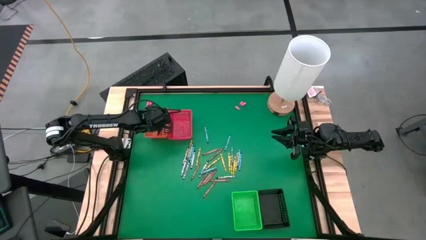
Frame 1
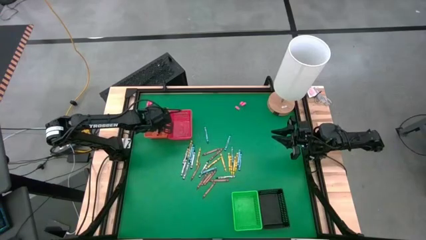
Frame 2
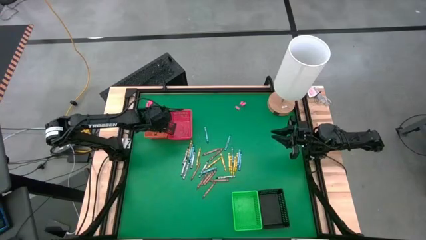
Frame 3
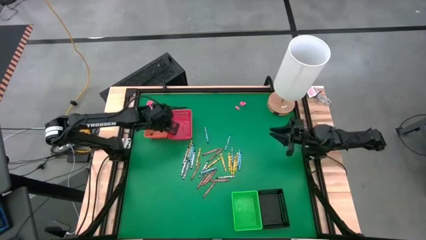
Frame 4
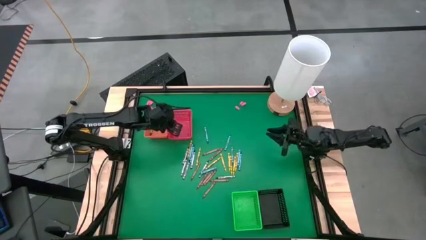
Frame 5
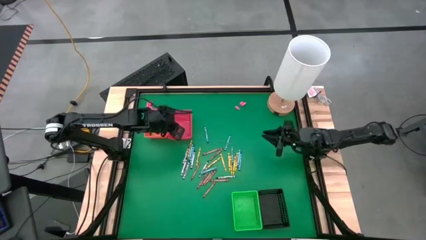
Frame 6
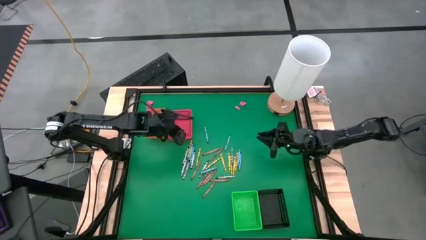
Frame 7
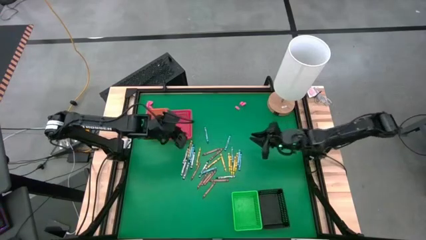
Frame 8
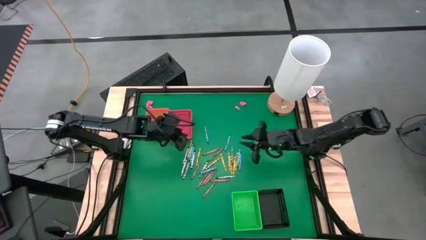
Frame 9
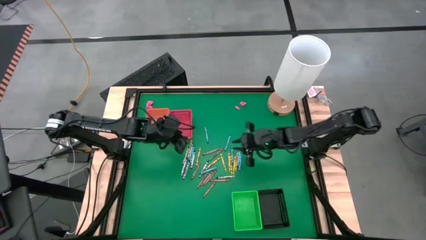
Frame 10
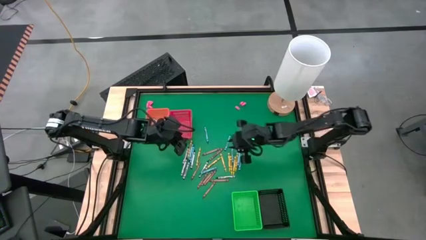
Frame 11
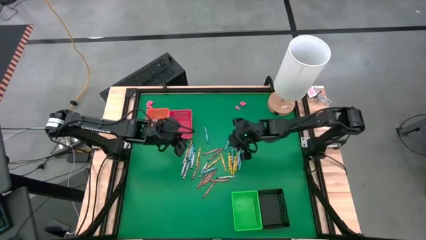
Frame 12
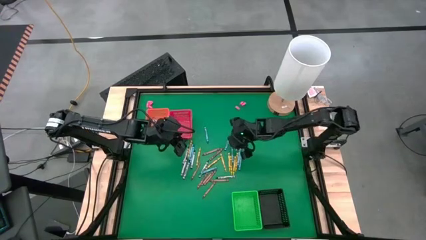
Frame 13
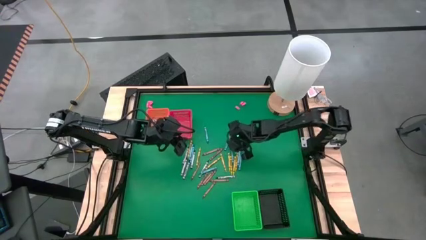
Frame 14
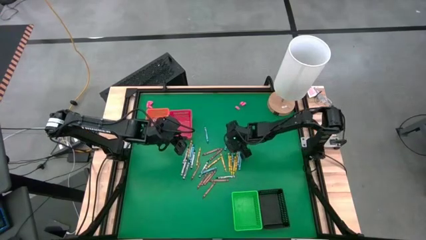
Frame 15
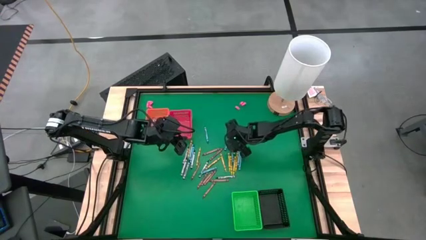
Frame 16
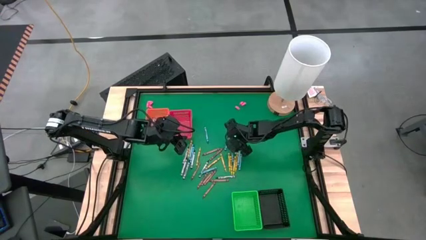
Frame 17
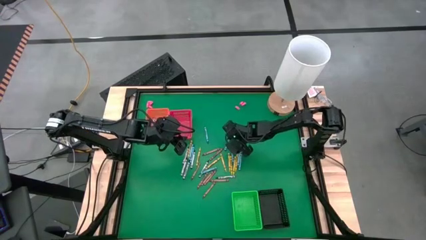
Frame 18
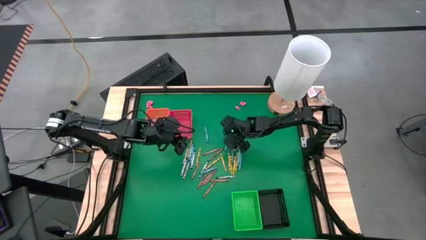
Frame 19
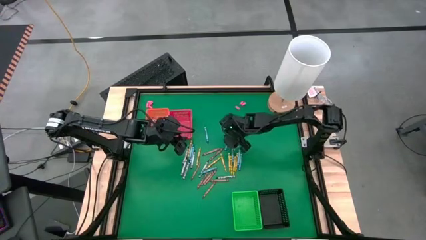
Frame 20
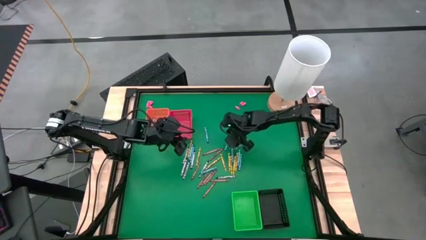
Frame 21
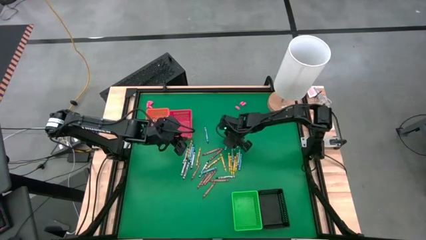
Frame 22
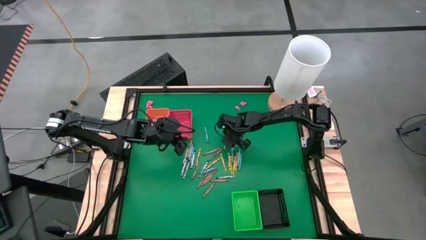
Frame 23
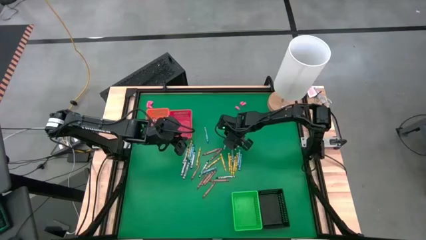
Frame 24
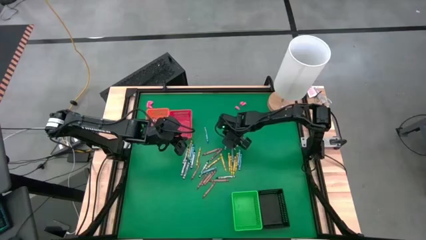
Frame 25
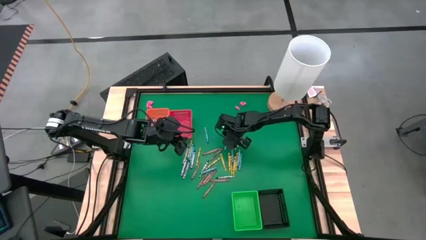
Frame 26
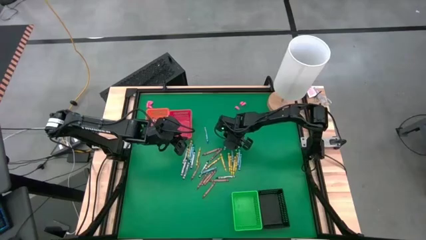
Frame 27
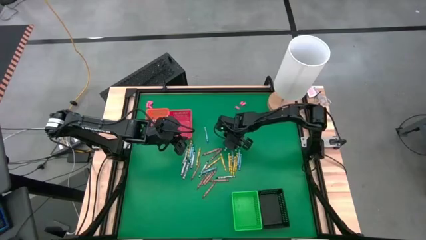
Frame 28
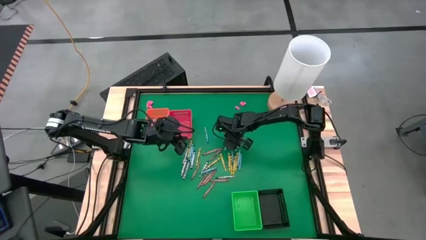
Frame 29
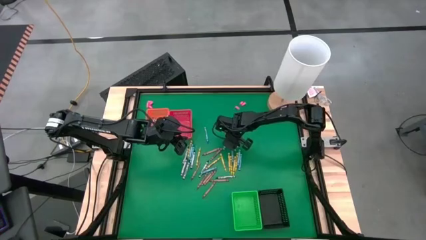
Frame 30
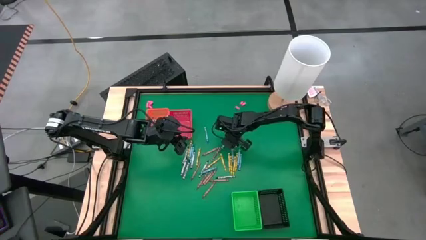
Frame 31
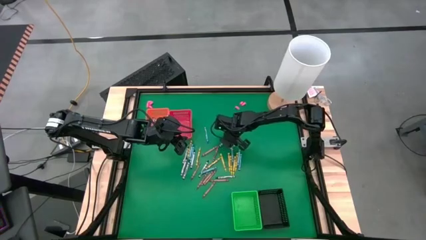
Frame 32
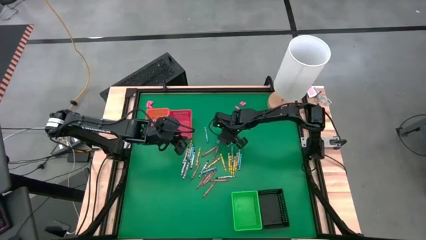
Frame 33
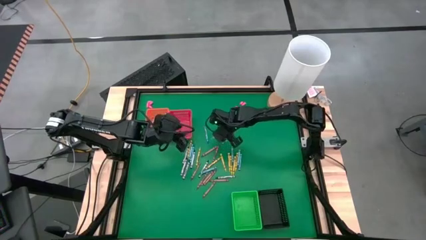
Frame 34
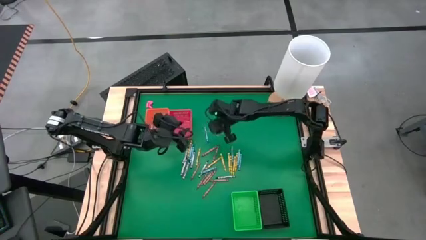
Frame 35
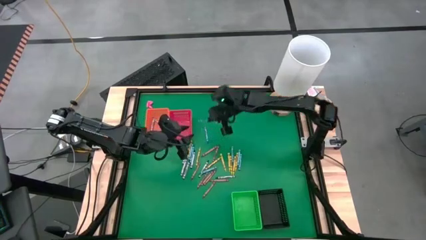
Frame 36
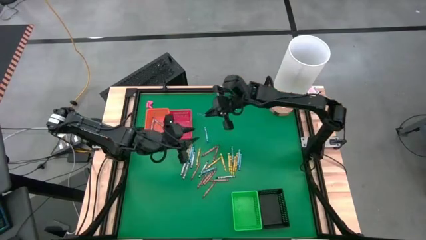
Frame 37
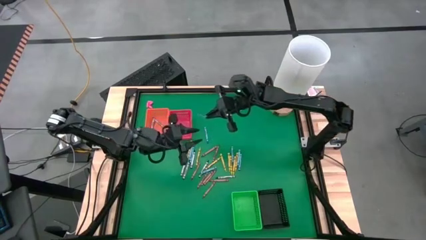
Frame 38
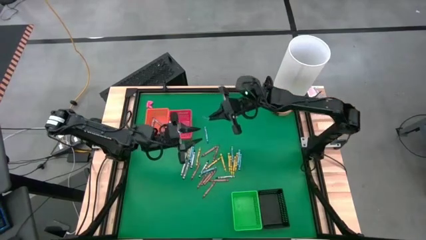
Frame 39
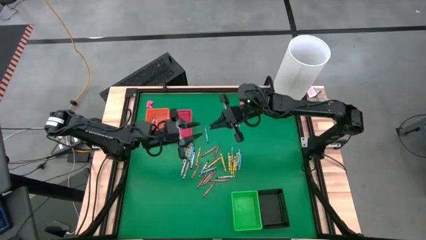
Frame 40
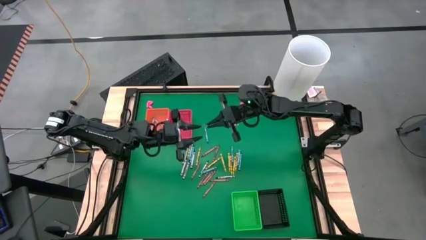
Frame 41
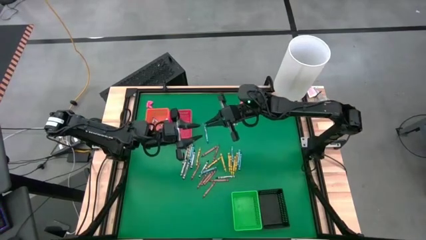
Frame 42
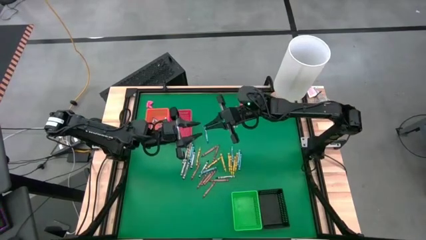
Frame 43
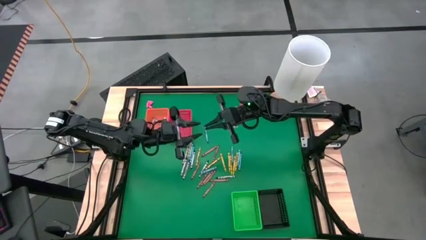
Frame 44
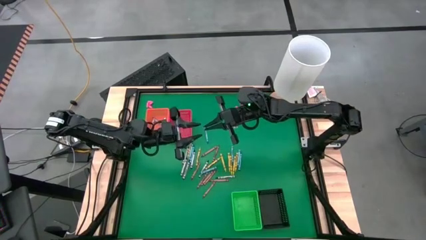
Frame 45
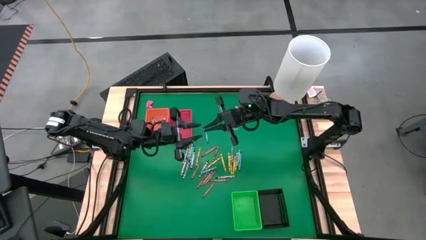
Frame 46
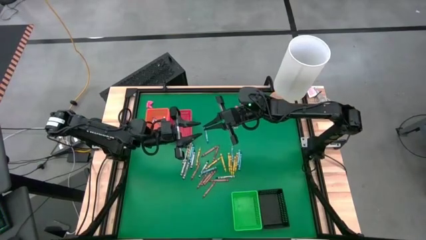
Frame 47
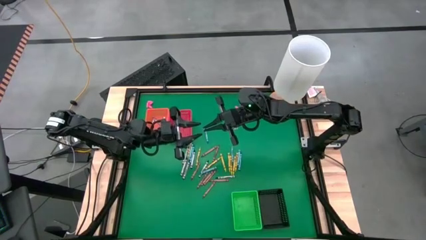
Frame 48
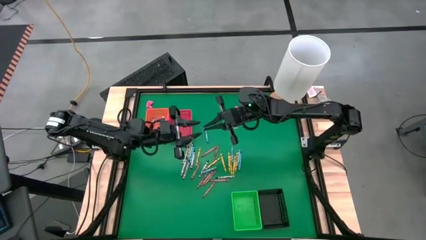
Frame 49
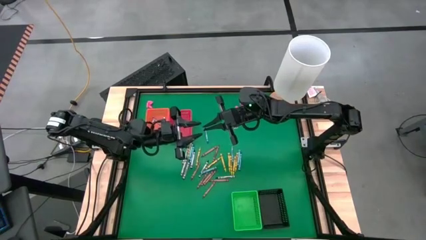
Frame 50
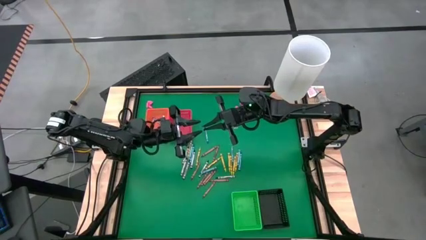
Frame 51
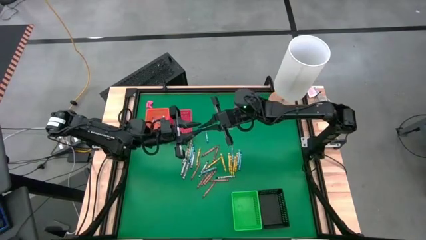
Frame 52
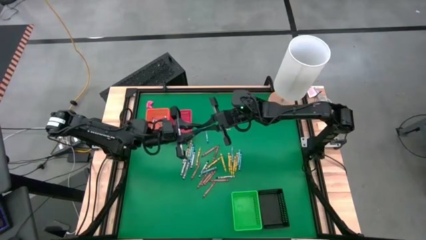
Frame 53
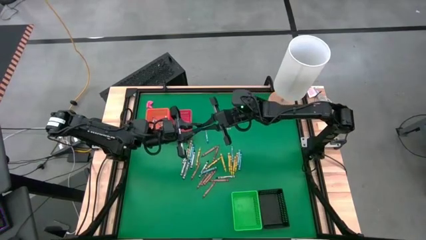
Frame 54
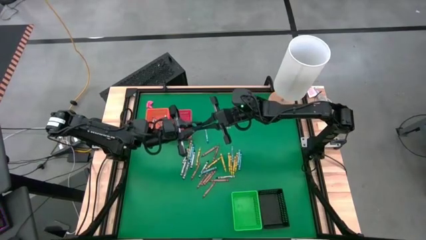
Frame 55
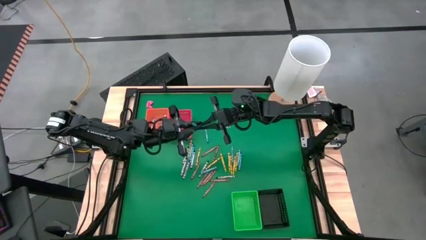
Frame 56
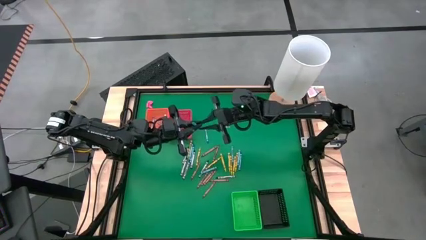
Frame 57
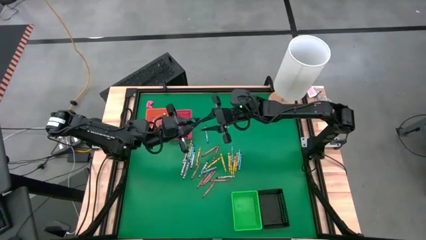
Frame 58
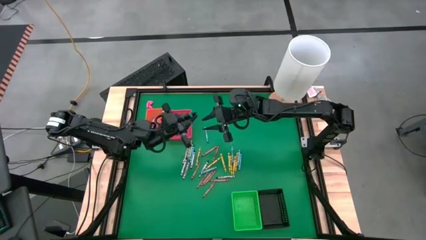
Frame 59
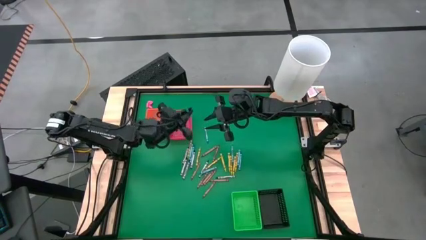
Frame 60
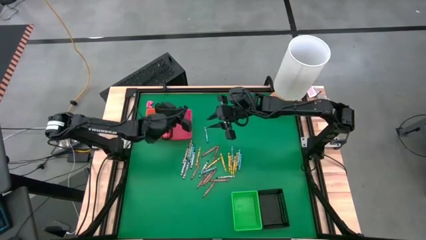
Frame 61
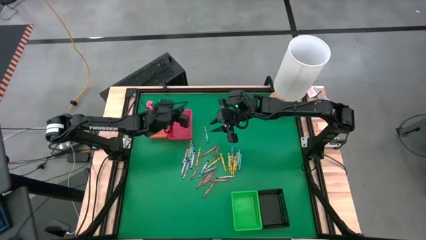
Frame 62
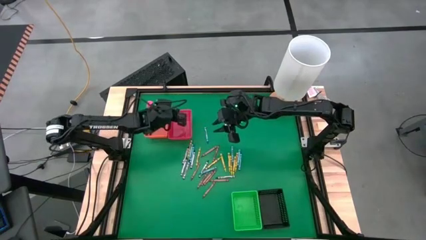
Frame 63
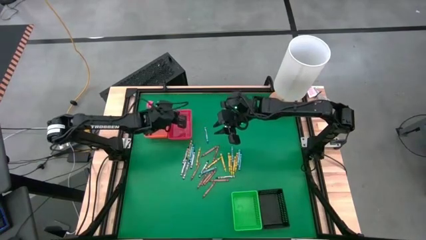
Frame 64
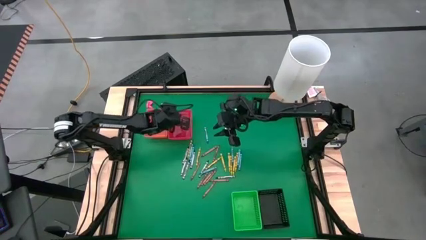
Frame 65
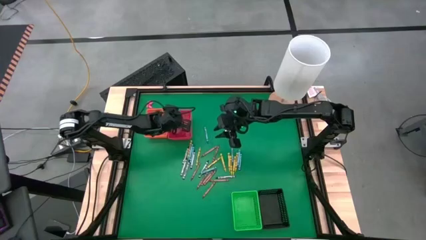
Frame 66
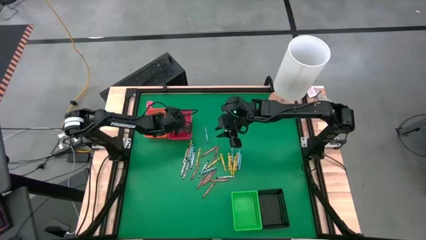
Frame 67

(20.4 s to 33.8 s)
Task: Sort crayons
Put the blue crayon into the red bin

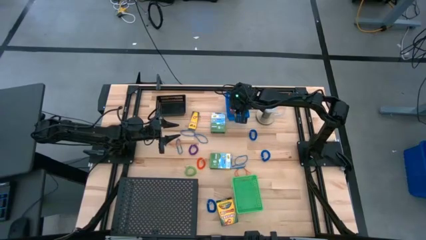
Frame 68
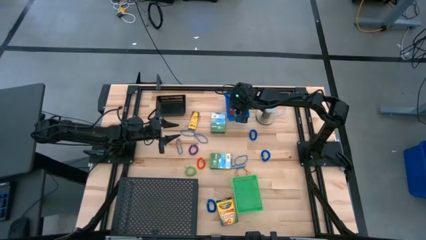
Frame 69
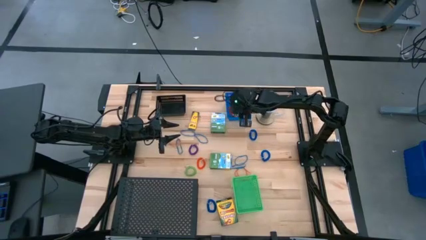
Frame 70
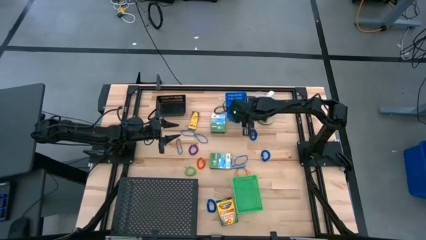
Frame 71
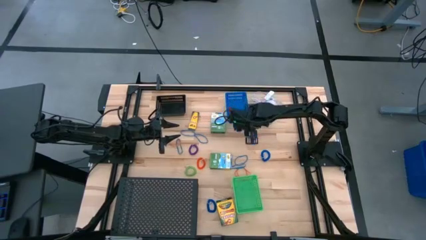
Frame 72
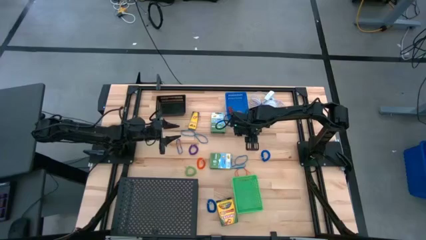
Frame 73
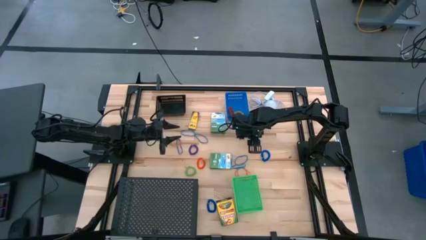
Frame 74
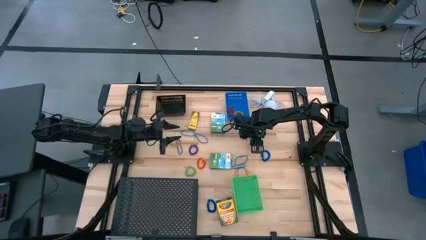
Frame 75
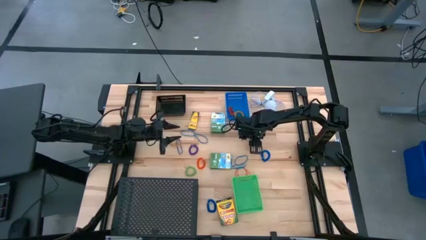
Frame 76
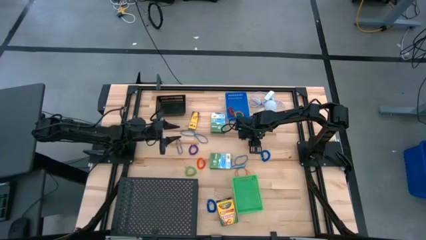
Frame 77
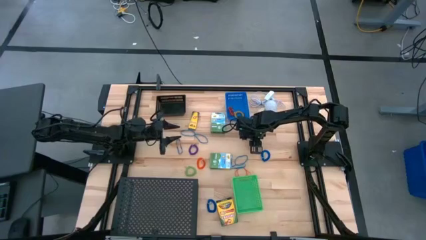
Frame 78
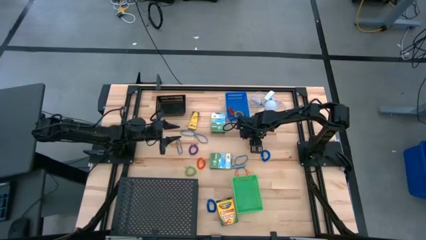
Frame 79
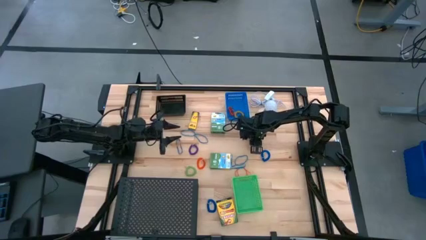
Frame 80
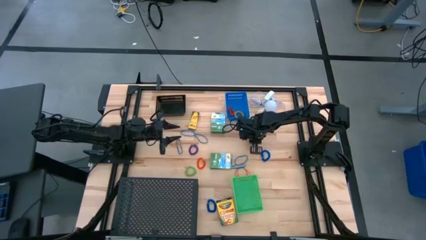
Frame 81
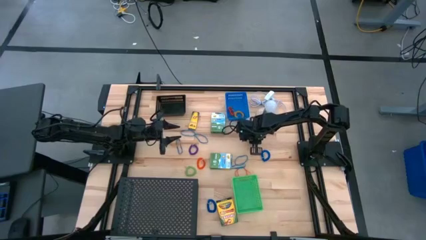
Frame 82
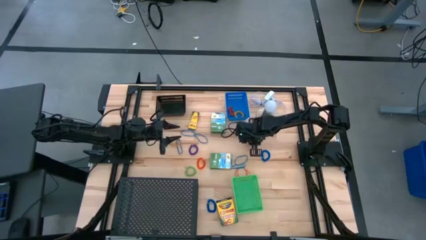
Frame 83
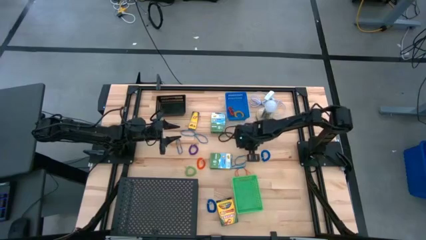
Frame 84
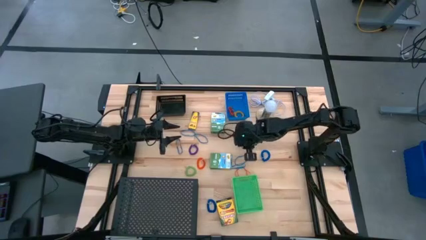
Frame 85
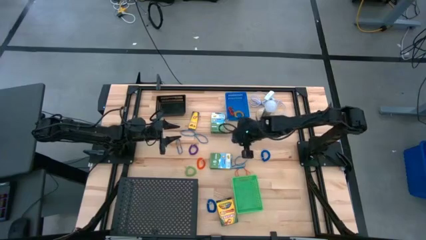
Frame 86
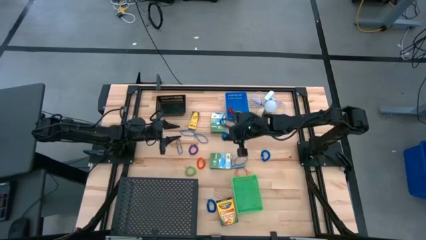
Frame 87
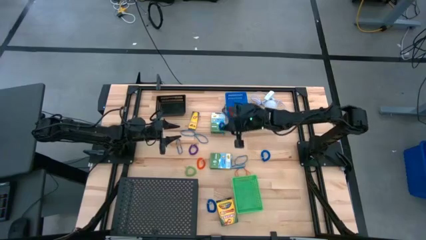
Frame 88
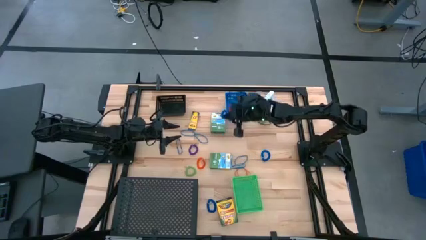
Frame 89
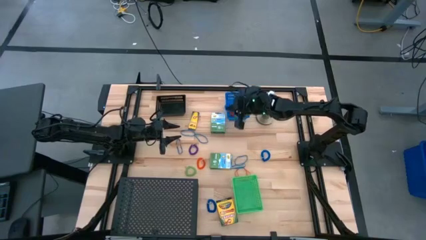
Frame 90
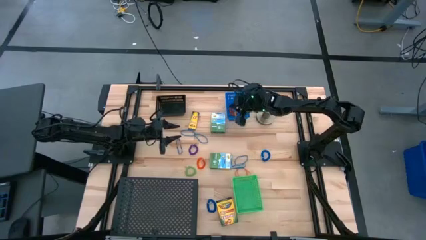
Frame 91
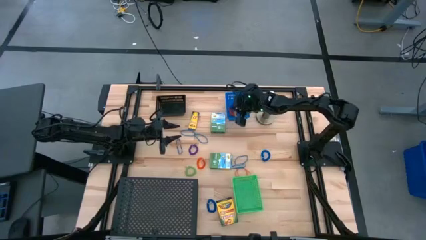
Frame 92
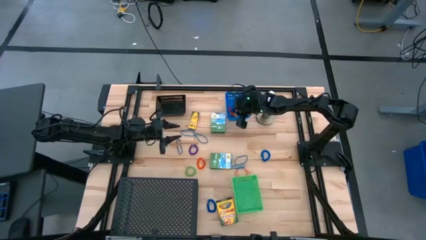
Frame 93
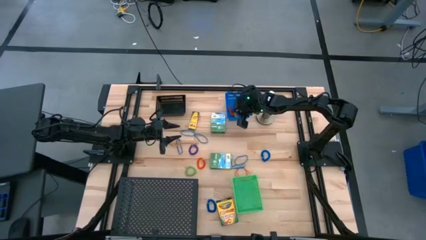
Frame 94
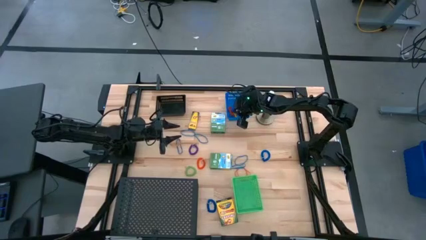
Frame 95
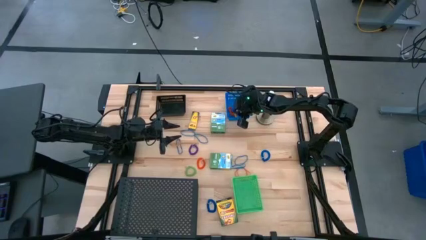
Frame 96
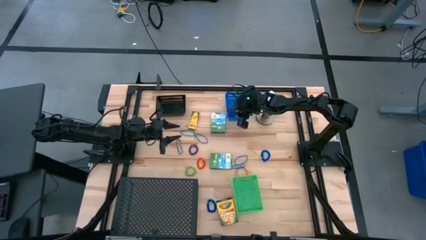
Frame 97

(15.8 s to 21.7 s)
Task: Pick & Place Office Desk Supplies
Put the top right blue spring keychain into the blue bin
